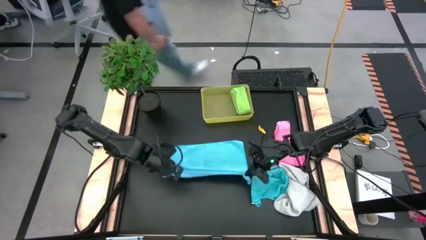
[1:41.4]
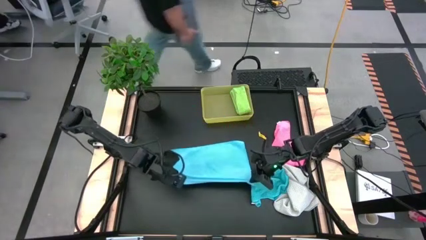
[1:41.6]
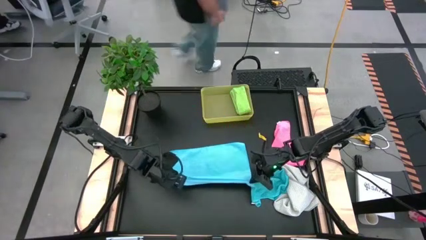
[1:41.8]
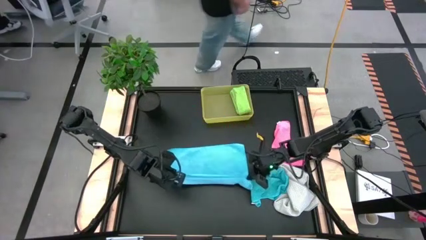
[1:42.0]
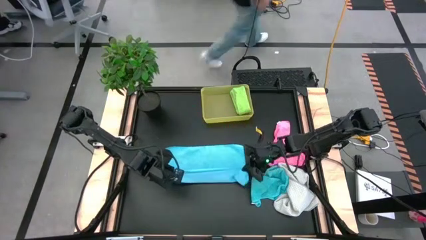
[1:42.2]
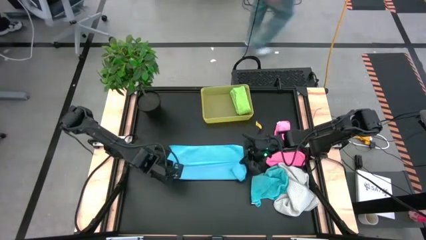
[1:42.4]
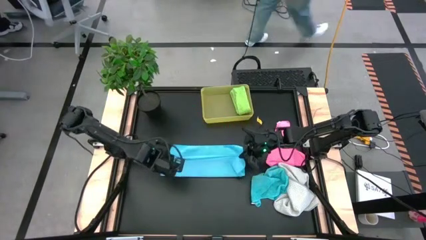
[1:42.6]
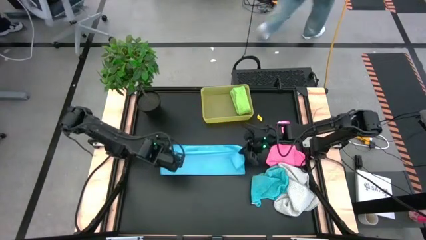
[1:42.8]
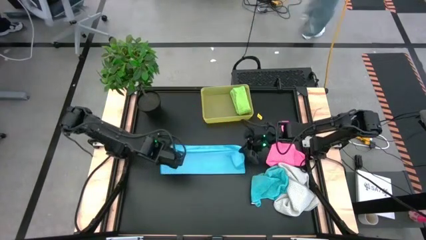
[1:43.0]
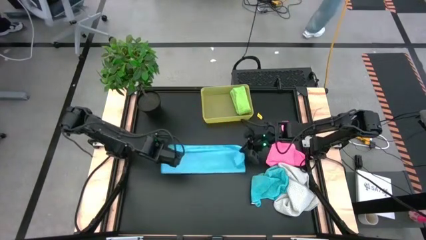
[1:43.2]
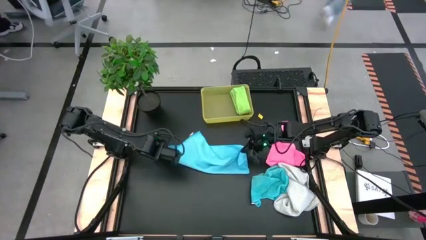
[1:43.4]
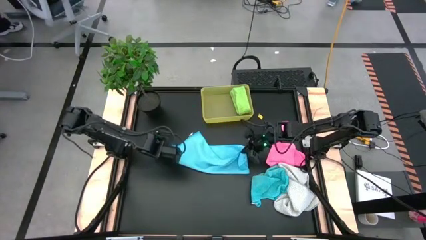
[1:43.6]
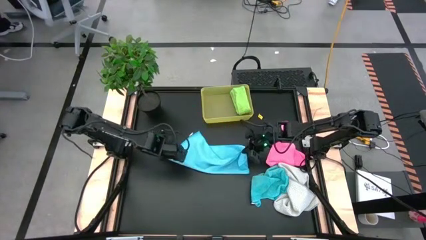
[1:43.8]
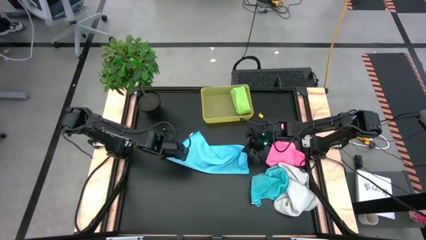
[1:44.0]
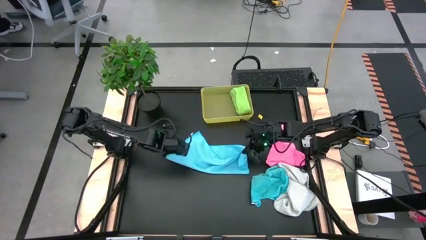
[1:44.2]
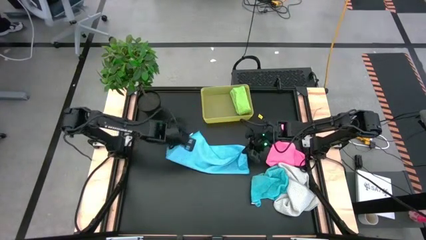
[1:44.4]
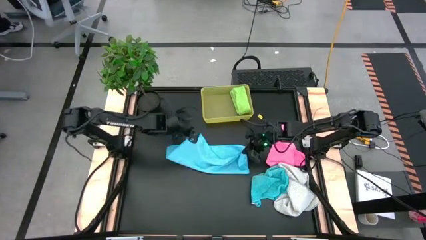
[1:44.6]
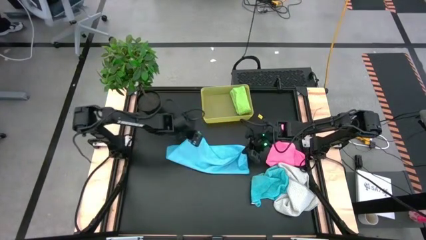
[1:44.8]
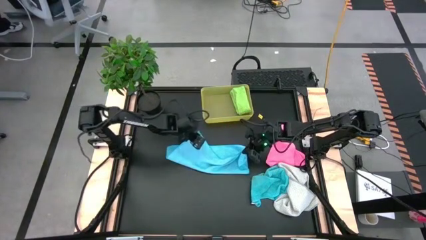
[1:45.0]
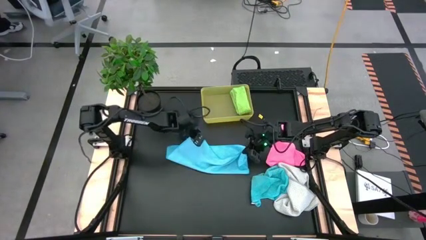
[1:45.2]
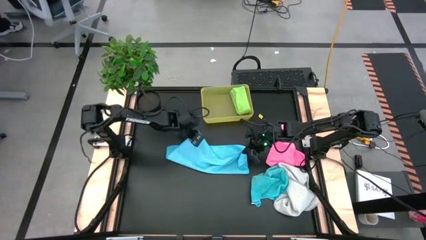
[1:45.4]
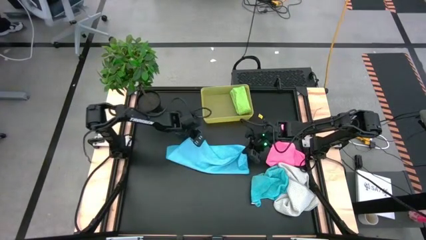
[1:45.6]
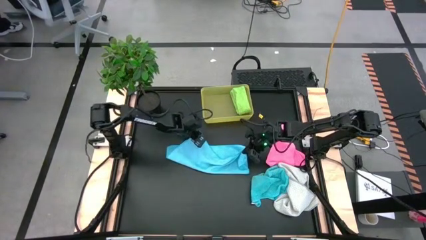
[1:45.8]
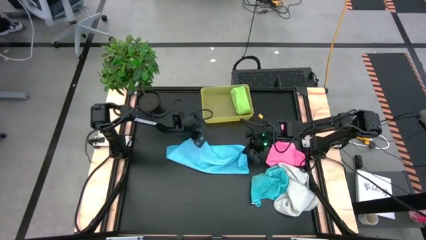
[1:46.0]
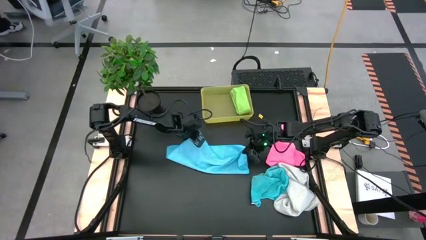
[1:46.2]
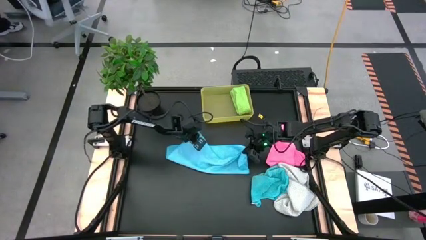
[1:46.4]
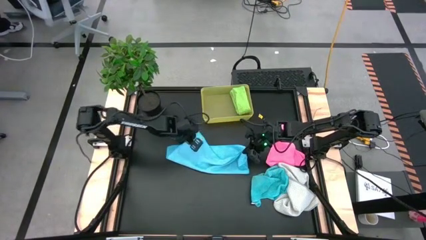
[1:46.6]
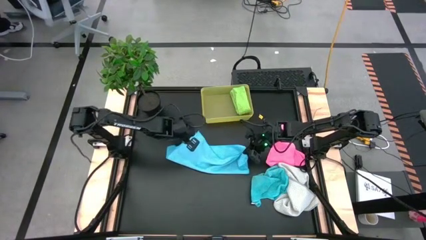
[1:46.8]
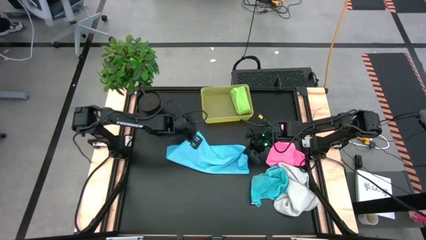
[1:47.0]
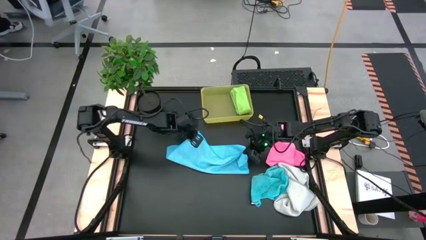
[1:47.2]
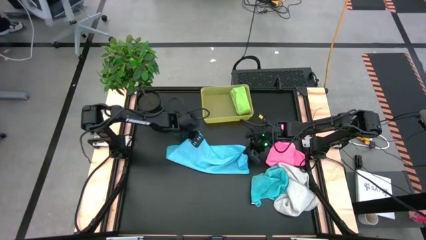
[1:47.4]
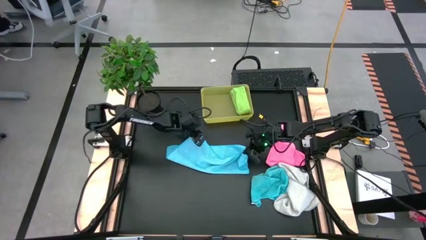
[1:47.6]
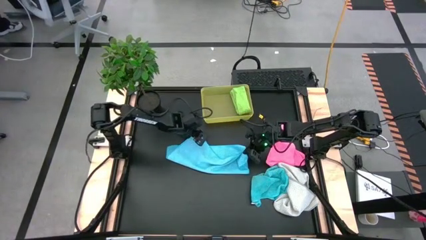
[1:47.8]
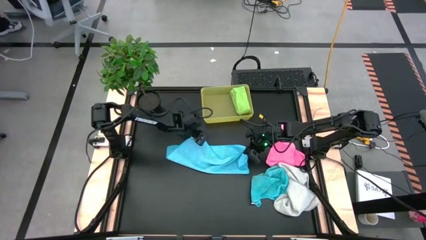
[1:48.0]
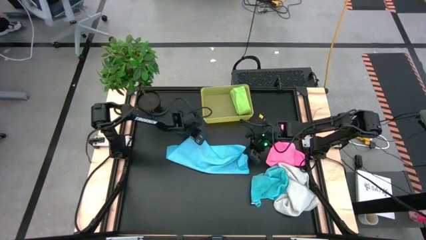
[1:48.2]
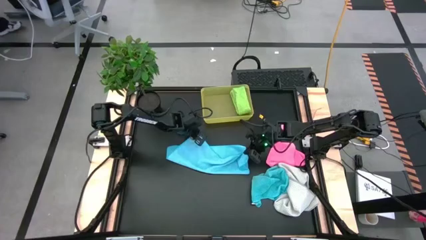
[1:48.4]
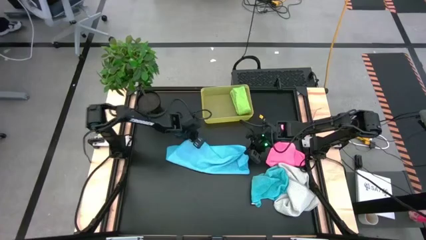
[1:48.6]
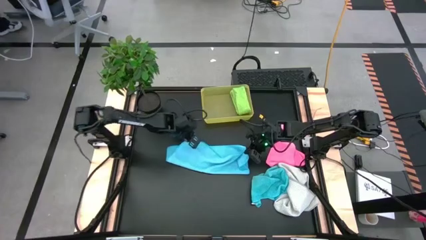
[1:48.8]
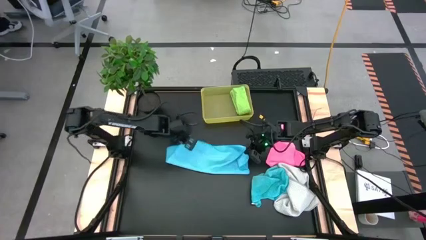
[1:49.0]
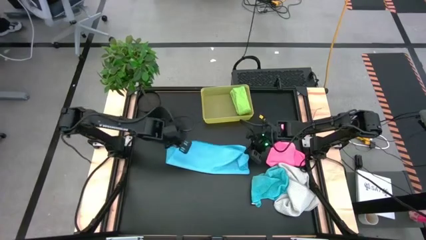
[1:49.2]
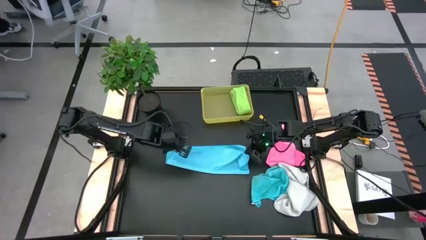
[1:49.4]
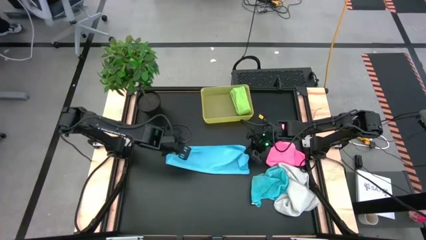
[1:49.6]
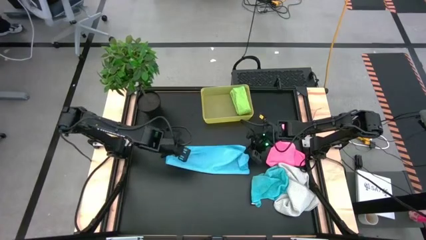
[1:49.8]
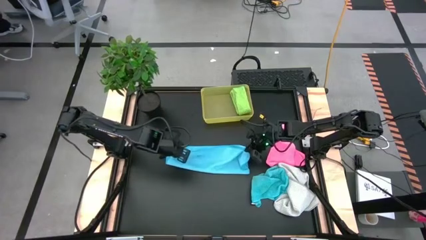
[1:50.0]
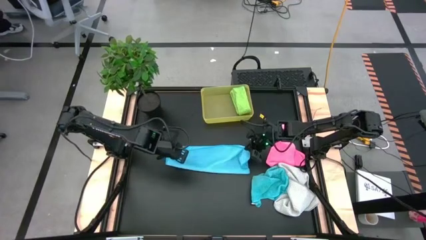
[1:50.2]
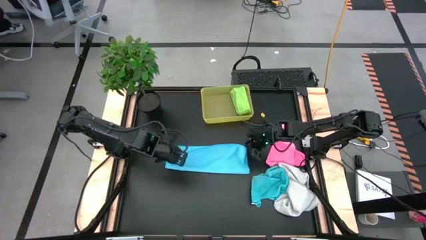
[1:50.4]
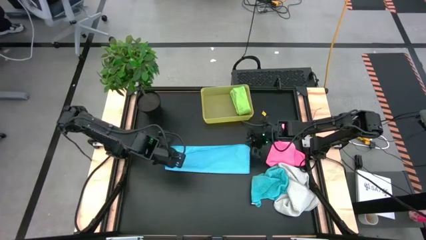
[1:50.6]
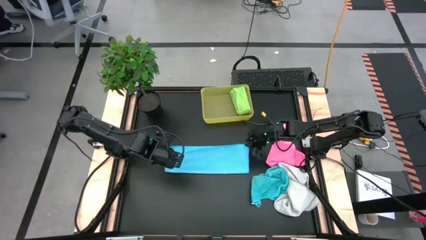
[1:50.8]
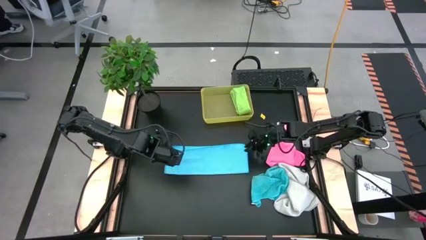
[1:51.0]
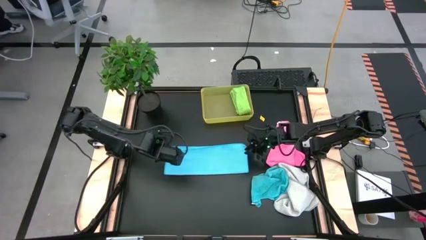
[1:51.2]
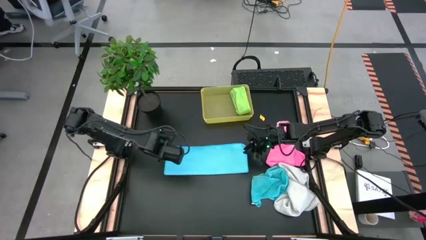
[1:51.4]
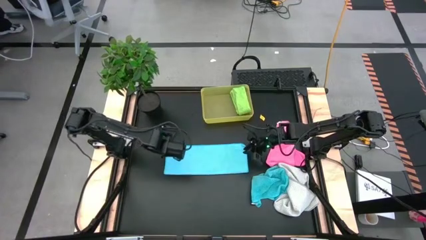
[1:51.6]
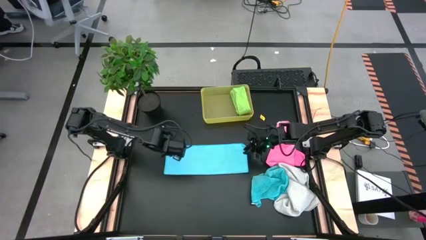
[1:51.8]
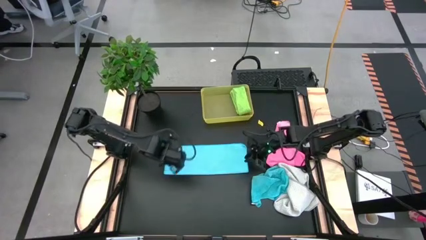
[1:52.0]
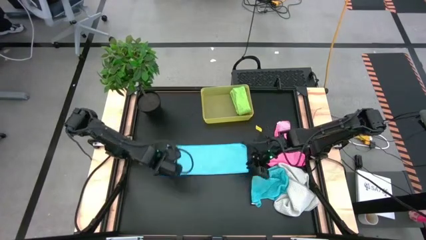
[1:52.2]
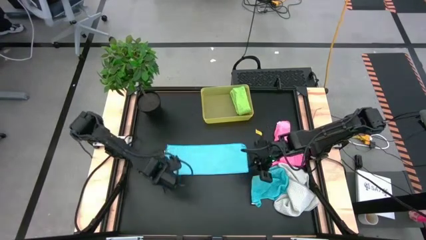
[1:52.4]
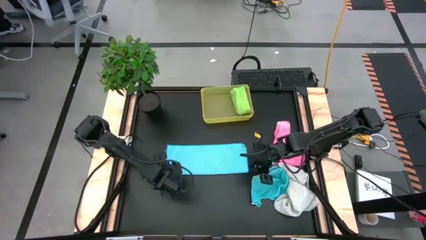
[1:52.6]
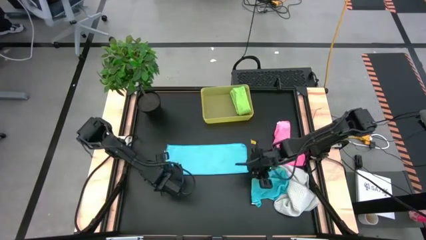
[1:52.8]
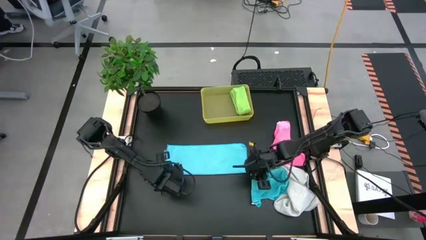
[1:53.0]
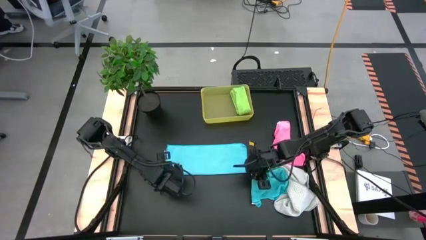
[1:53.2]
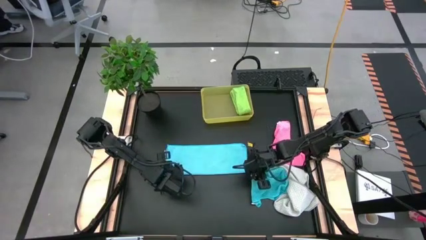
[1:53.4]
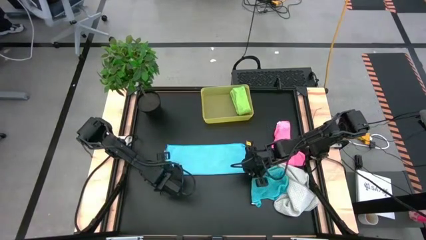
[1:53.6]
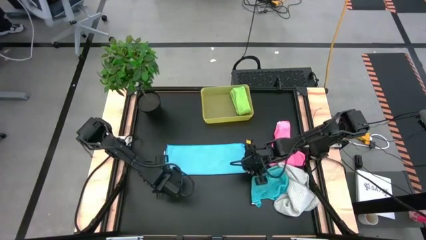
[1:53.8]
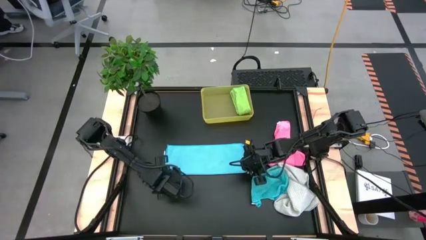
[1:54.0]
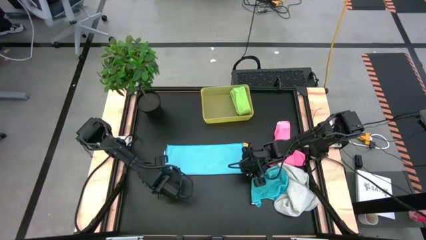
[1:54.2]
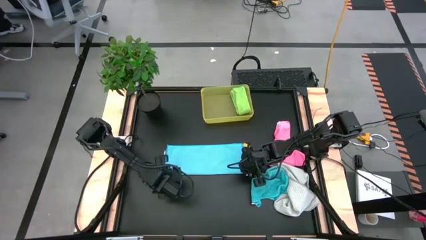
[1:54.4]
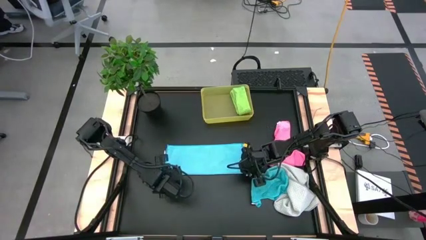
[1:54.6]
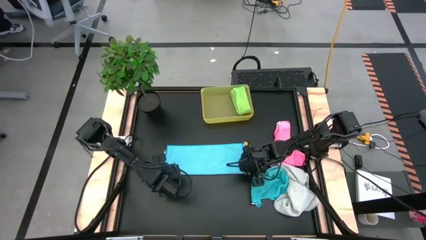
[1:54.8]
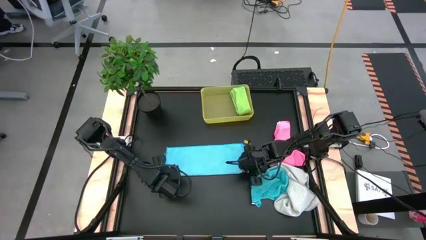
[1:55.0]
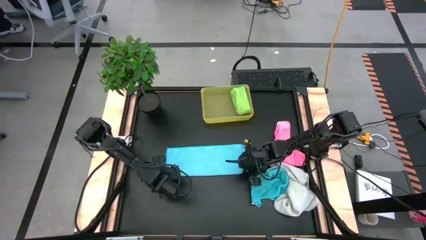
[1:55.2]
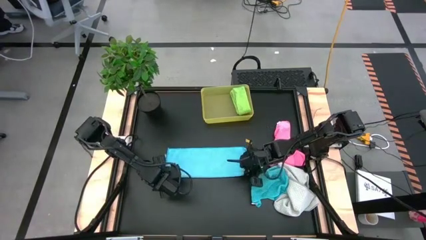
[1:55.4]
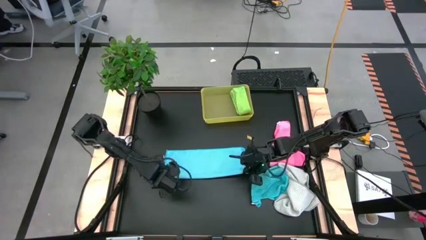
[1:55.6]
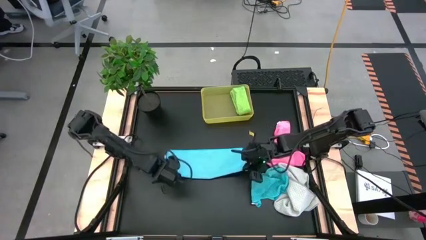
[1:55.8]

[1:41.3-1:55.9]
Task: Fold microfiber towels
Fold the left blue microfiber cloth
